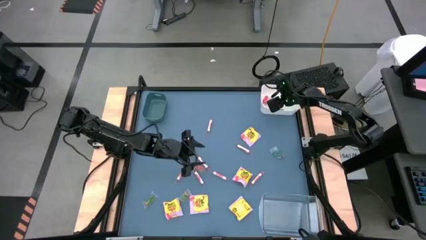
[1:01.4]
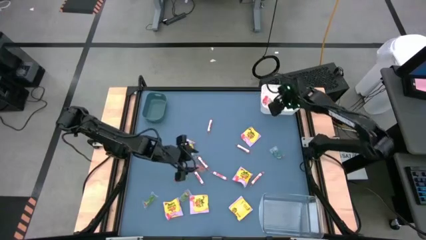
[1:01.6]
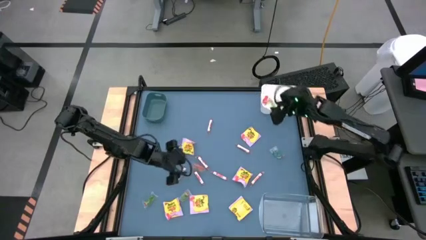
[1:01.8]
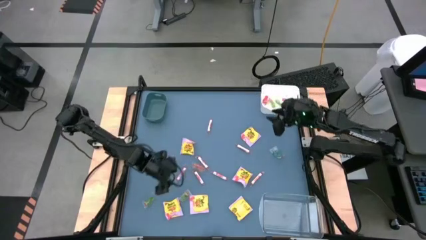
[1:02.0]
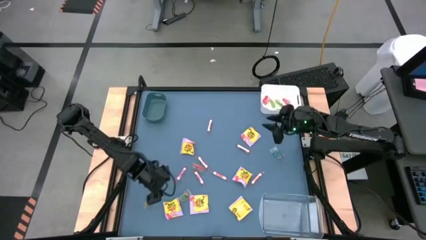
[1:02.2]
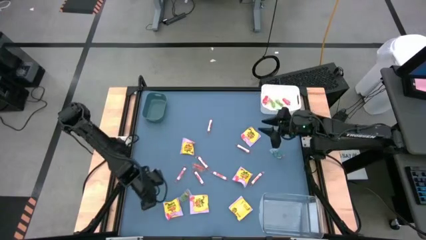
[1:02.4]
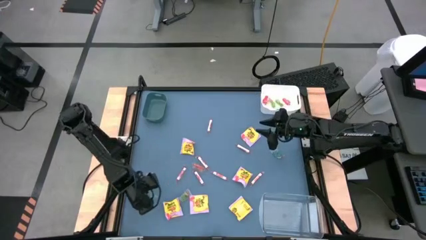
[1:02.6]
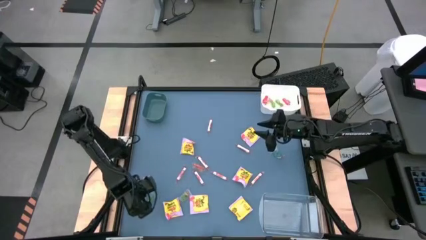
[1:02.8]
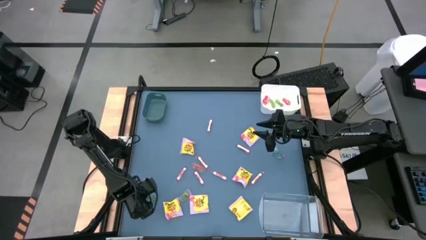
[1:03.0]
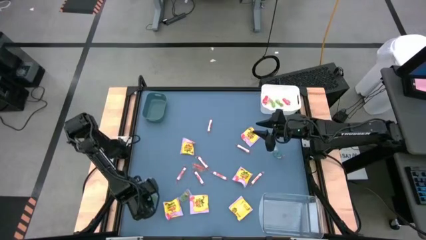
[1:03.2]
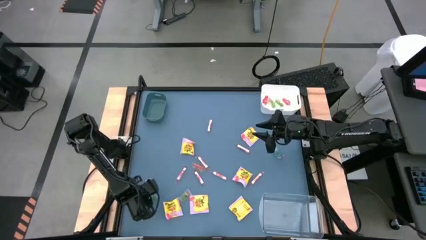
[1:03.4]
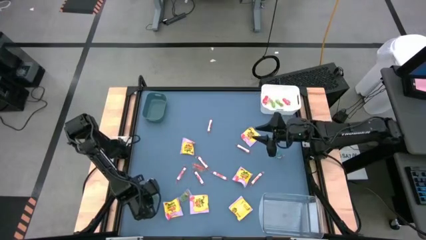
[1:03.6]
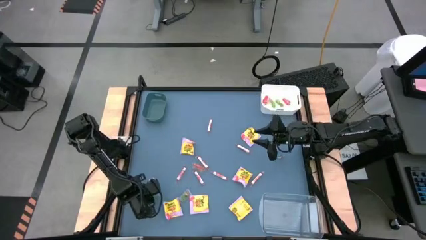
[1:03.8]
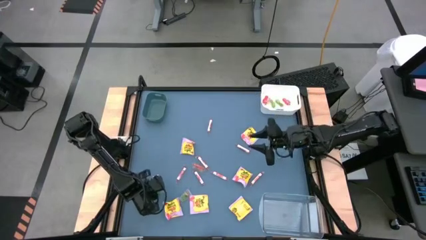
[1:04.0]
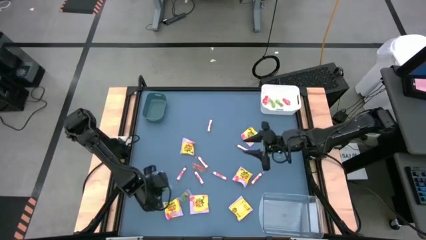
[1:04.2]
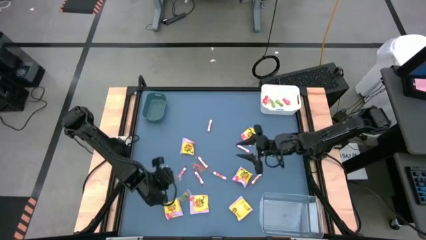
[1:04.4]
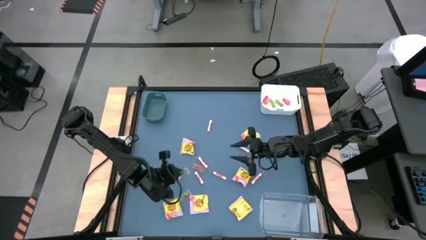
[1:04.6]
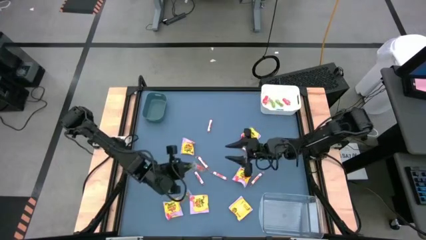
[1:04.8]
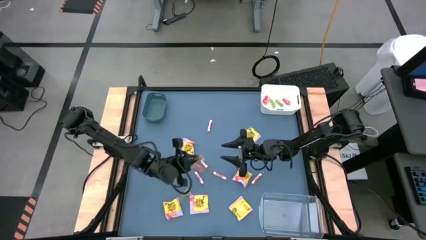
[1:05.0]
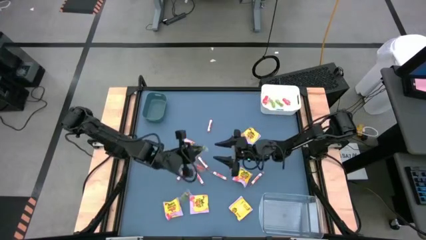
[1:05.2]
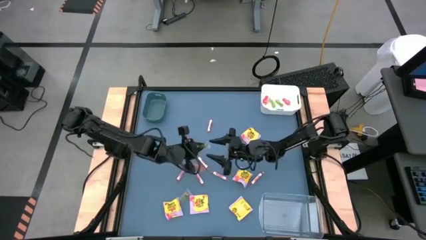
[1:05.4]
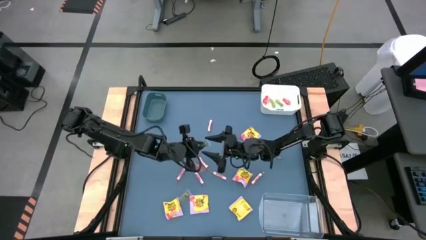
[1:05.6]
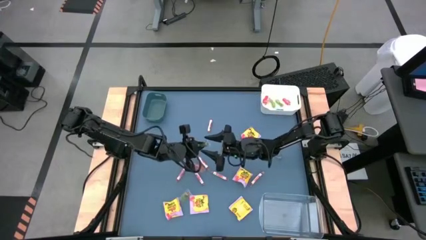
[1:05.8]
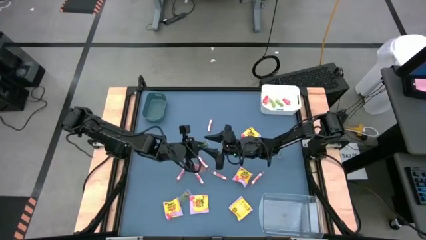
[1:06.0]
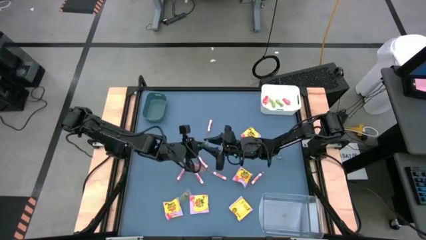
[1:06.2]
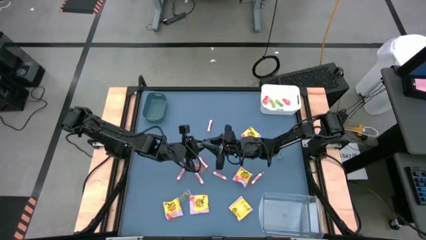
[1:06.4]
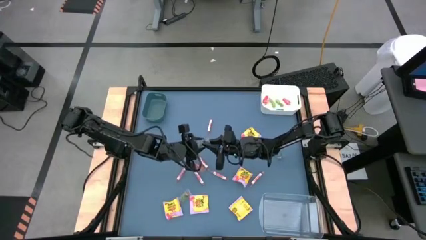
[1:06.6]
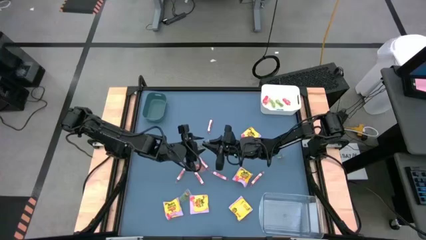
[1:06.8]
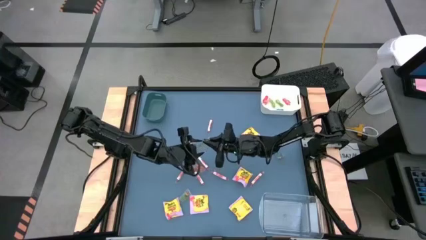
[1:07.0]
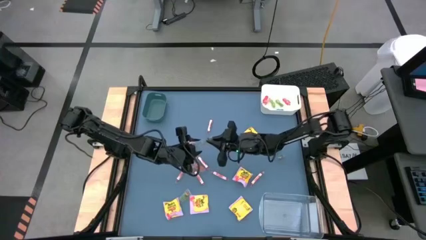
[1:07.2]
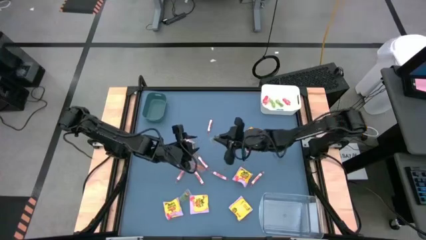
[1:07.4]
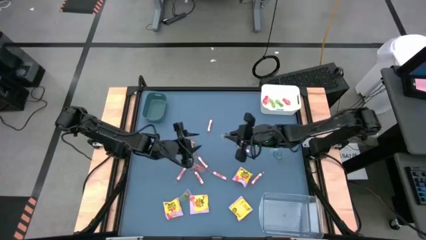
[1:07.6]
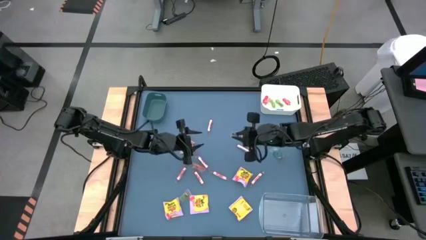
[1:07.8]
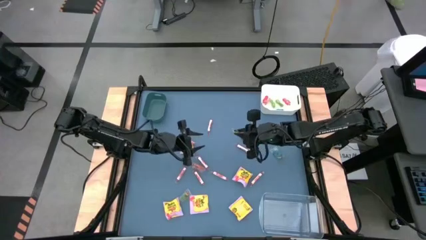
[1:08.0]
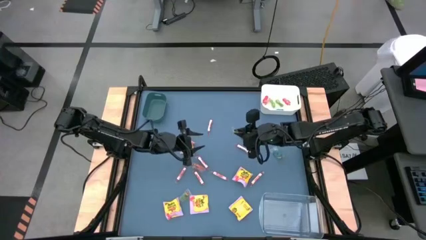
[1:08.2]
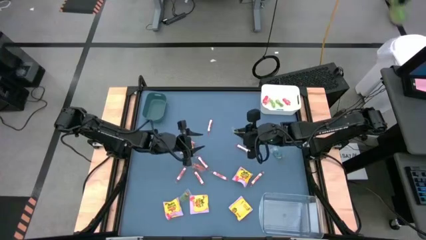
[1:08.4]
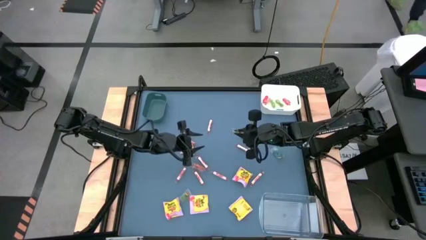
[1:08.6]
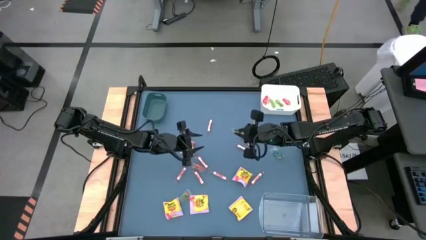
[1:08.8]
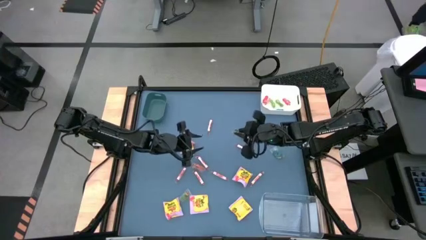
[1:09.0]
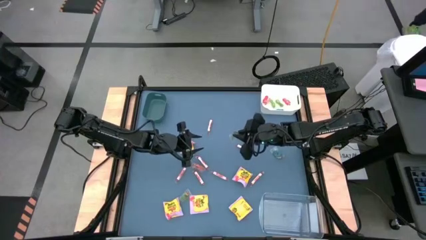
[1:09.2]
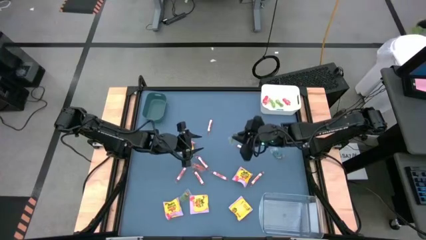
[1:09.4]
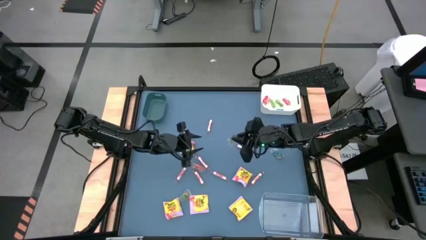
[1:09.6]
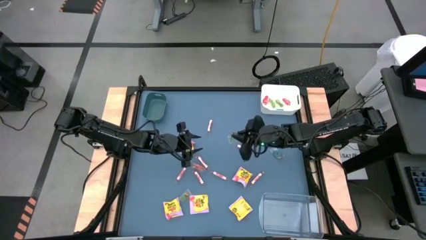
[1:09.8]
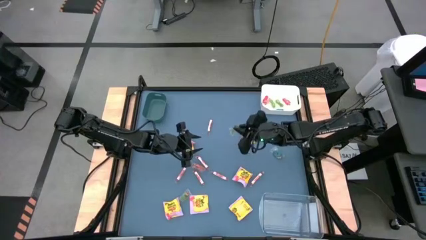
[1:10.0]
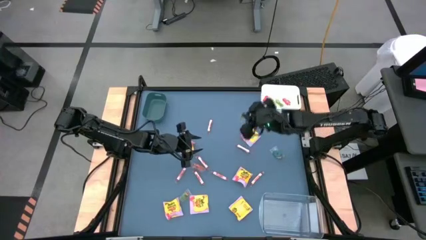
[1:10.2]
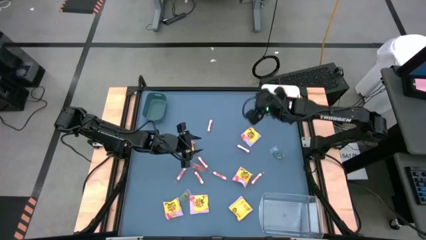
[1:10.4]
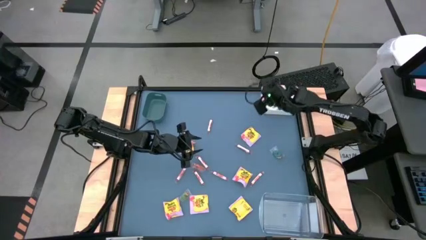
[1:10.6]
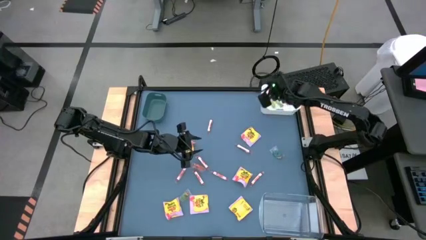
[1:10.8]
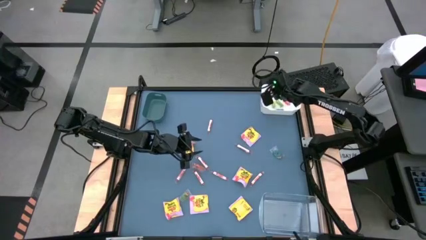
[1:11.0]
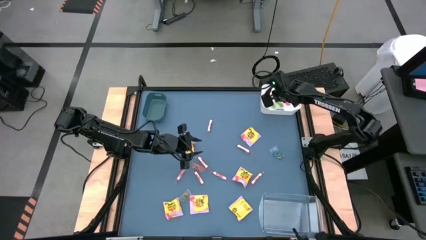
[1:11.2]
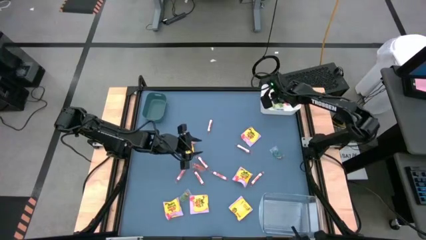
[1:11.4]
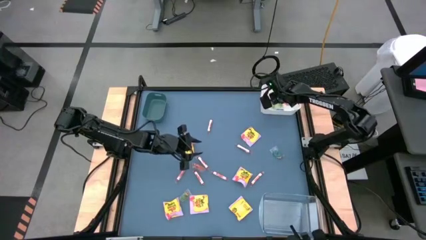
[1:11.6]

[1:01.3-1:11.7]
Task: Sort candy
Put the green gummy into the white bin

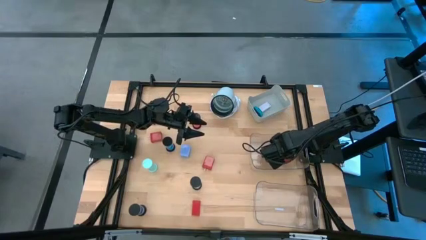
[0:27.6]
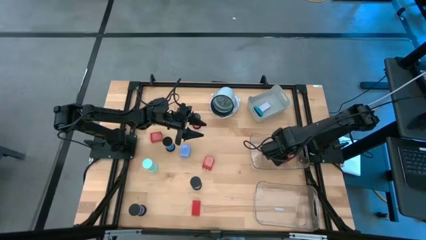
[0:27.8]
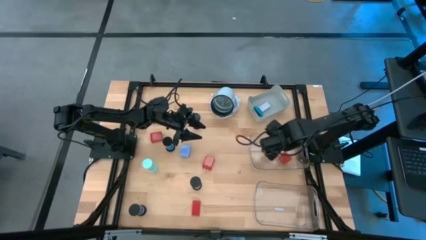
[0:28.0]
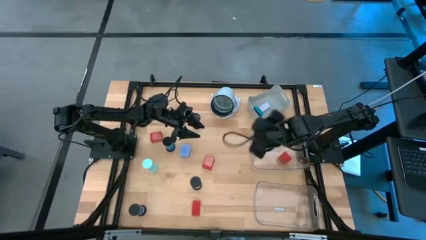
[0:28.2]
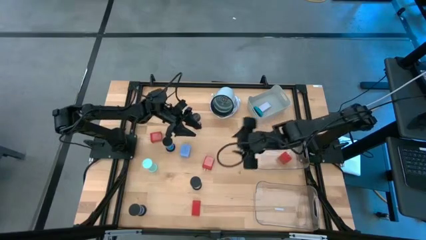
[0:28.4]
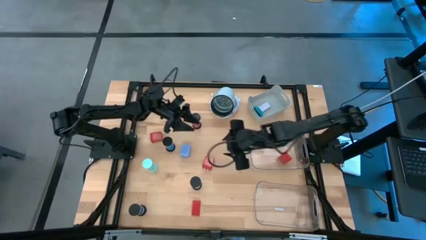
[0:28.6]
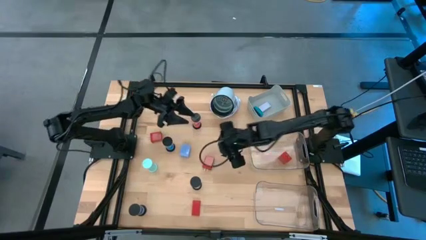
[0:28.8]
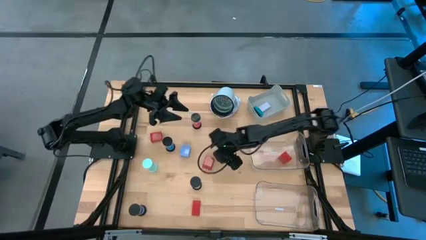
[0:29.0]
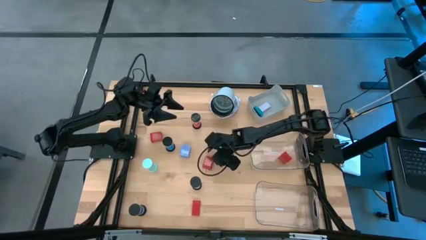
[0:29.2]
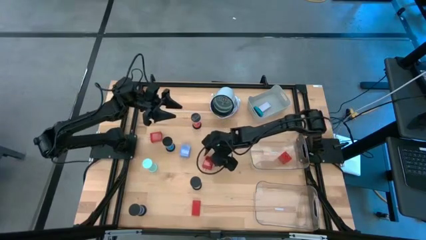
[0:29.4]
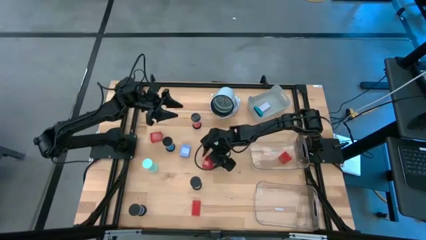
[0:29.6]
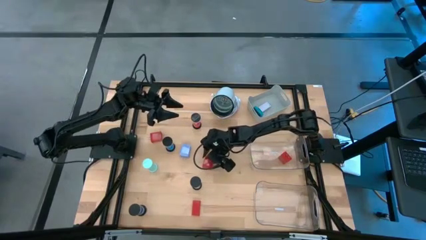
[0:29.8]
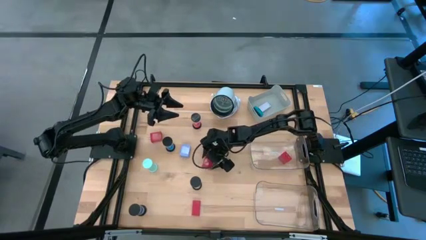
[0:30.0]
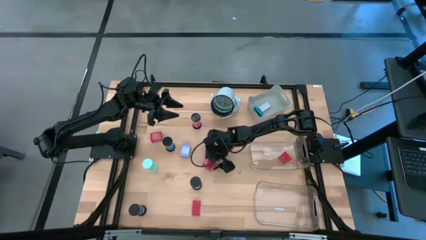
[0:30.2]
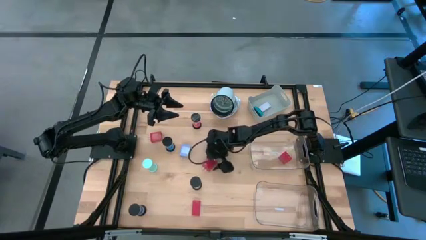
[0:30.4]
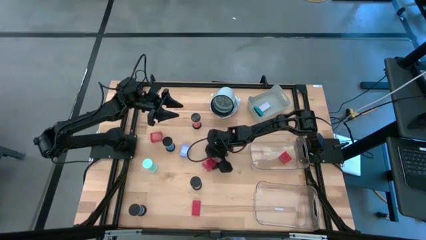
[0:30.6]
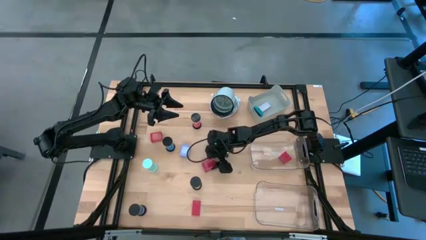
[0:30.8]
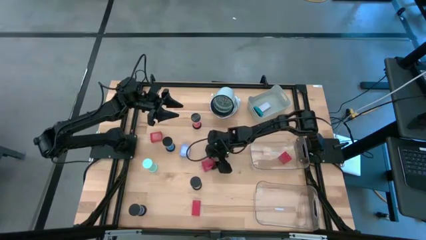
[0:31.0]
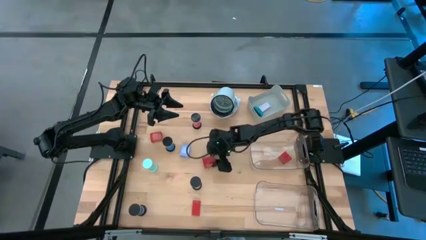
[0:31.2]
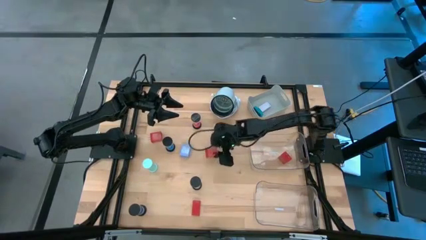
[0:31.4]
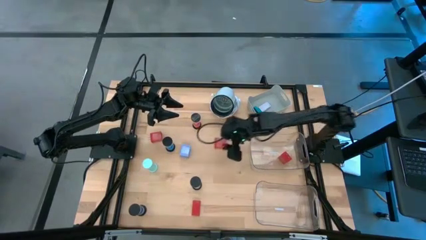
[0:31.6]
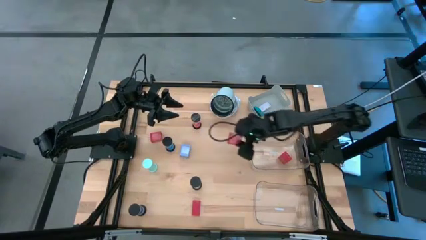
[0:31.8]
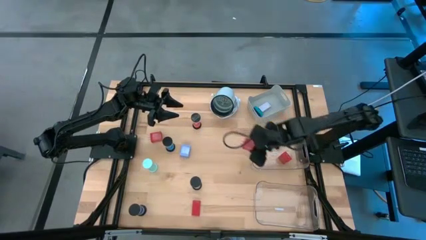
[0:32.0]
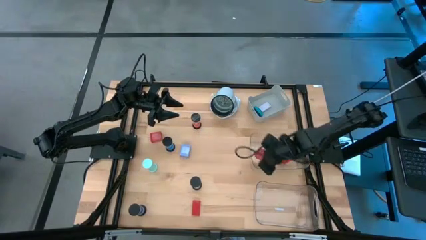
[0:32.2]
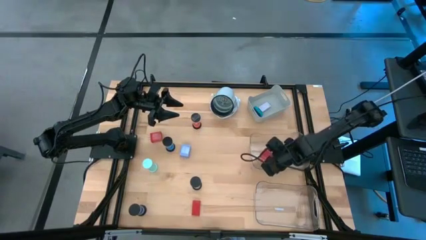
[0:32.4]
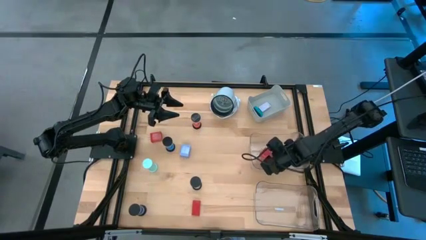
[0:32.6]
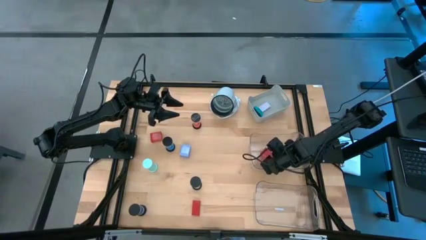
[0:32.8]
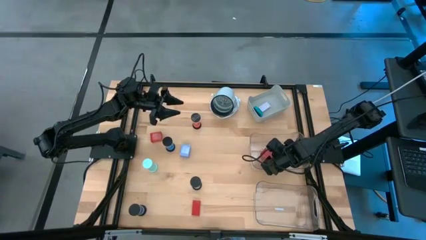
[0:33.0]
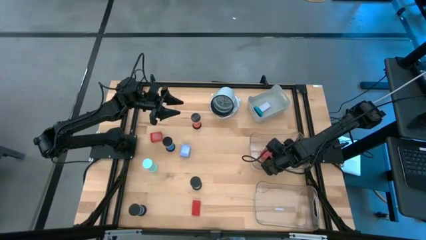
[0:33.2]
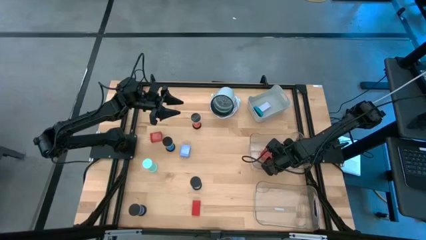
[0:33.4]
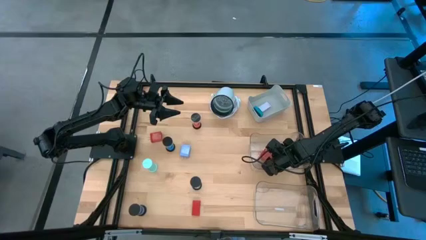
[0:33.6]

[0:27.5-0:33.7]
Task: Pick & Place Office items
Put the bottom red charger adapter into the top transparent bin
